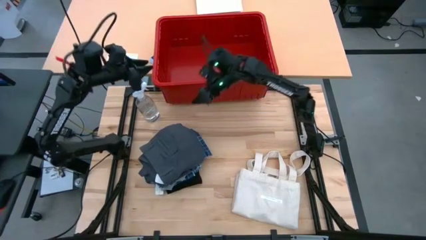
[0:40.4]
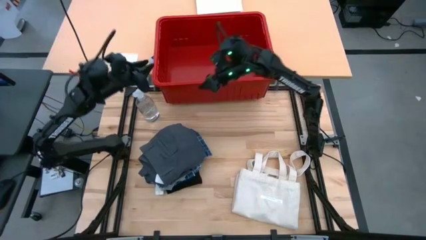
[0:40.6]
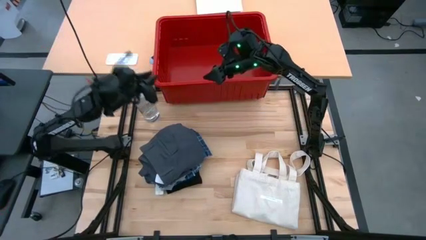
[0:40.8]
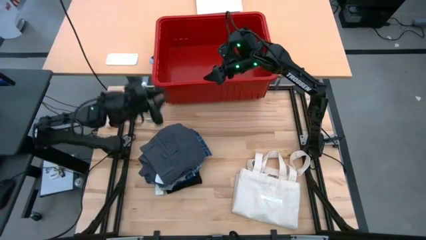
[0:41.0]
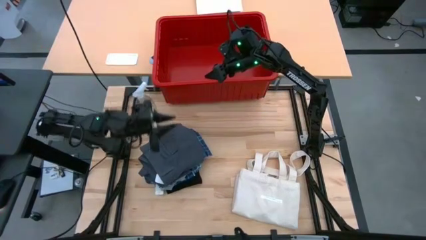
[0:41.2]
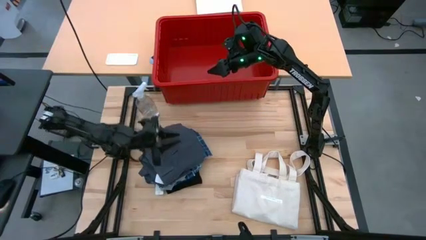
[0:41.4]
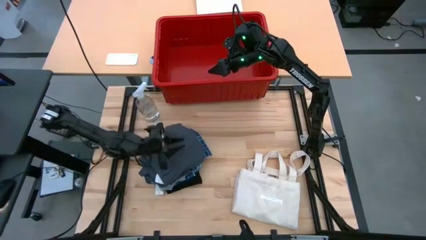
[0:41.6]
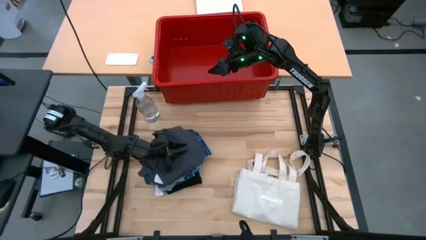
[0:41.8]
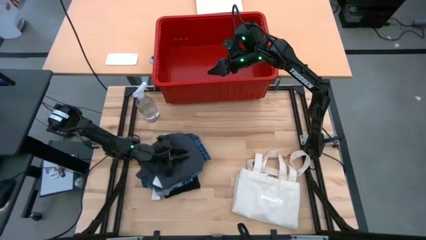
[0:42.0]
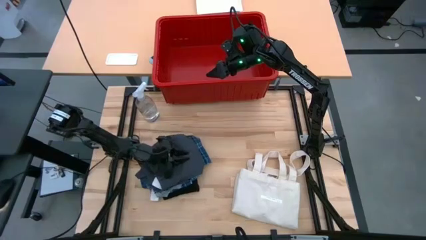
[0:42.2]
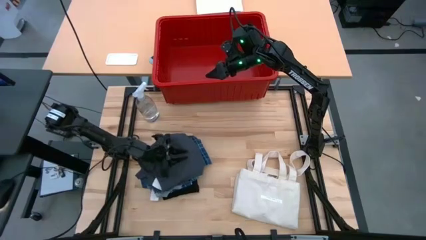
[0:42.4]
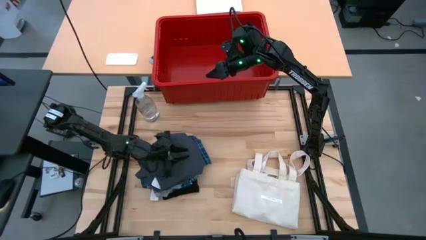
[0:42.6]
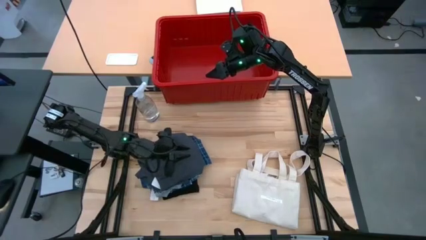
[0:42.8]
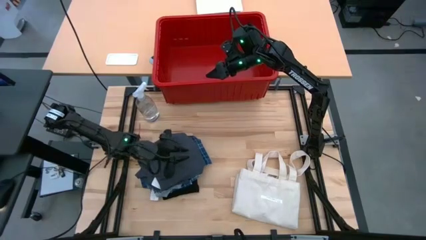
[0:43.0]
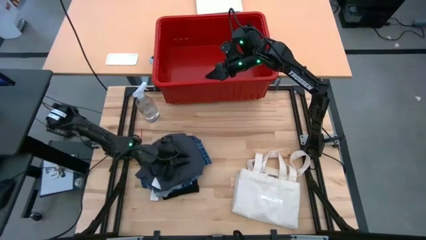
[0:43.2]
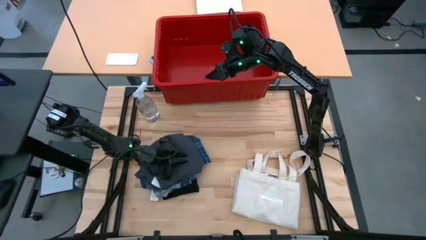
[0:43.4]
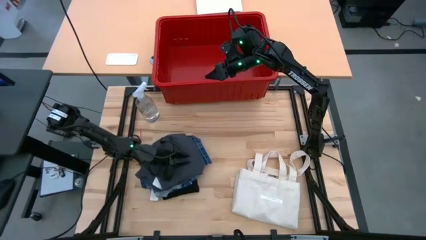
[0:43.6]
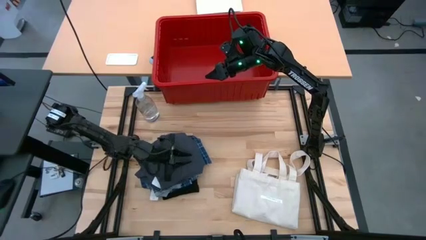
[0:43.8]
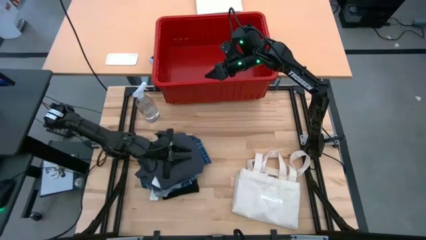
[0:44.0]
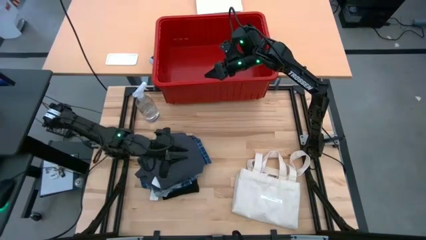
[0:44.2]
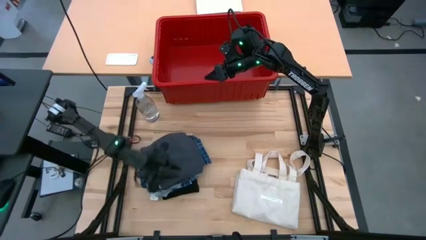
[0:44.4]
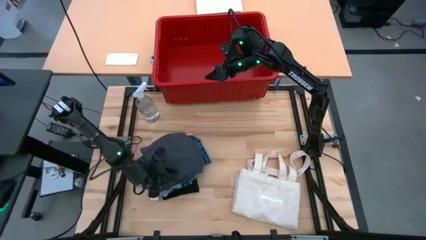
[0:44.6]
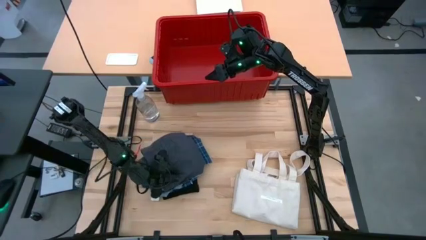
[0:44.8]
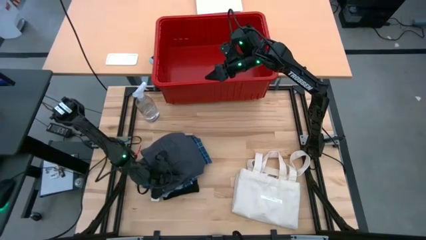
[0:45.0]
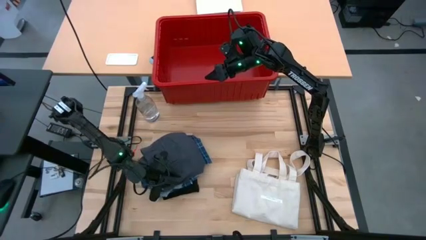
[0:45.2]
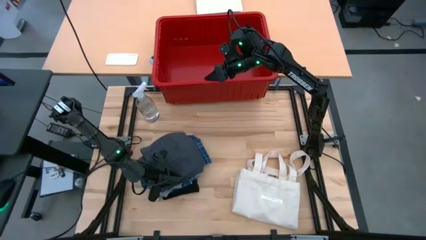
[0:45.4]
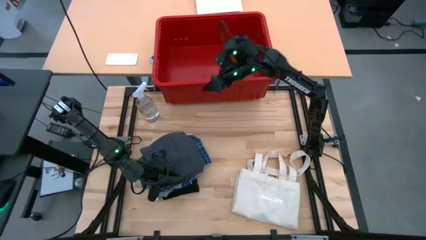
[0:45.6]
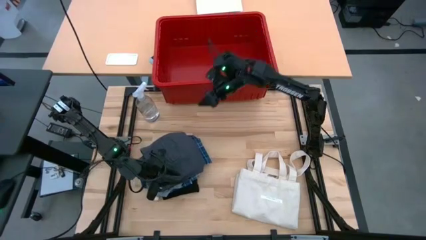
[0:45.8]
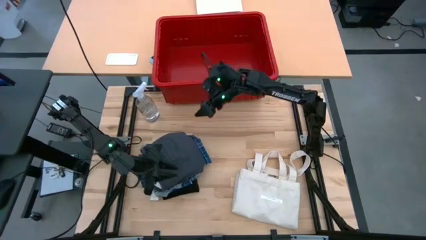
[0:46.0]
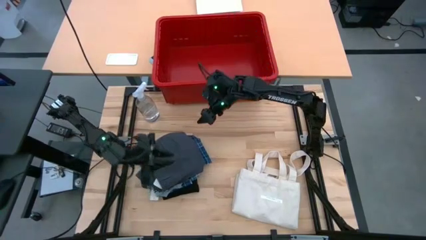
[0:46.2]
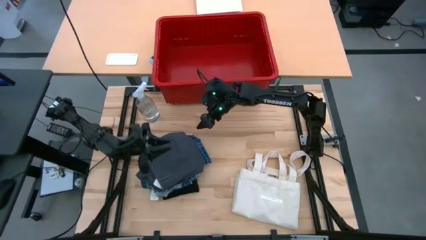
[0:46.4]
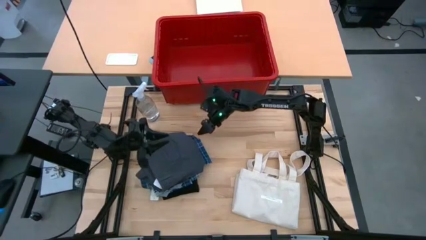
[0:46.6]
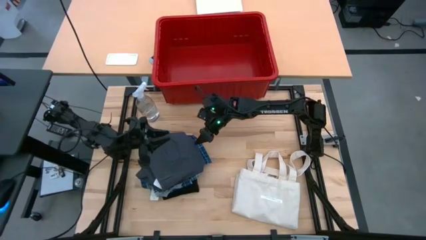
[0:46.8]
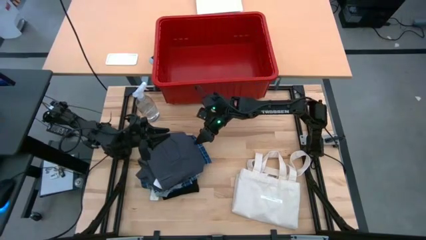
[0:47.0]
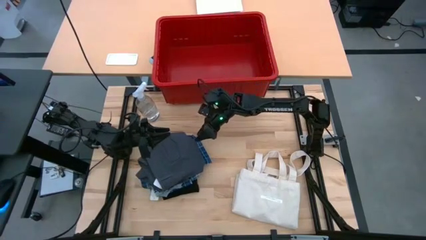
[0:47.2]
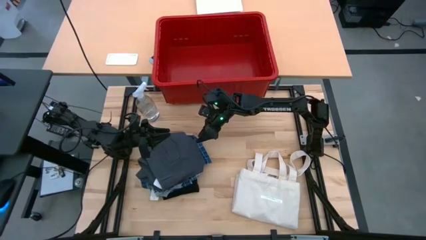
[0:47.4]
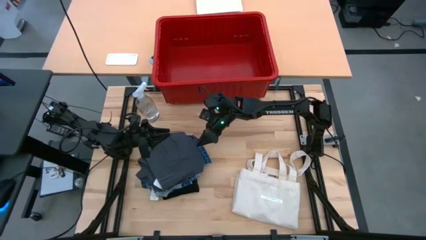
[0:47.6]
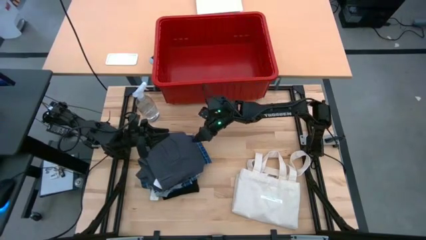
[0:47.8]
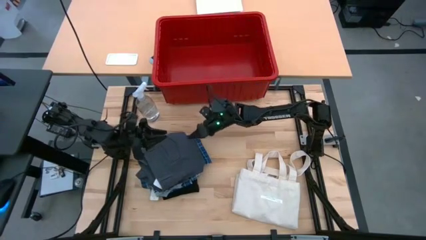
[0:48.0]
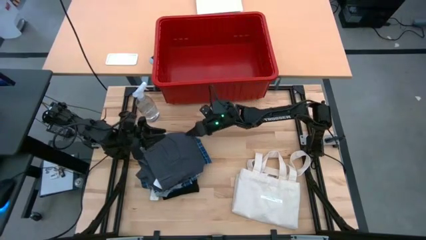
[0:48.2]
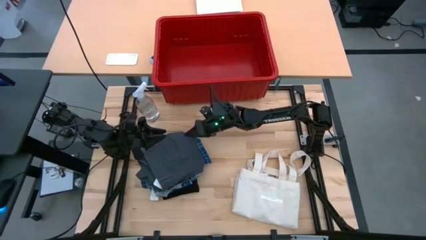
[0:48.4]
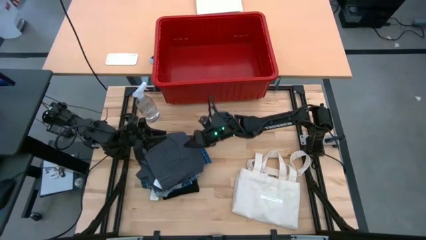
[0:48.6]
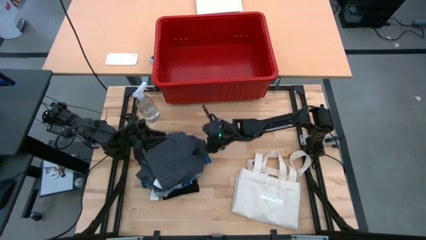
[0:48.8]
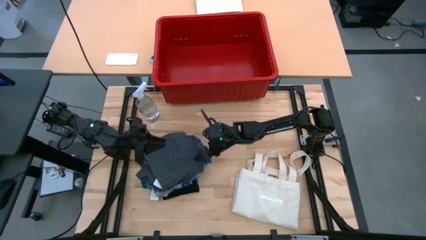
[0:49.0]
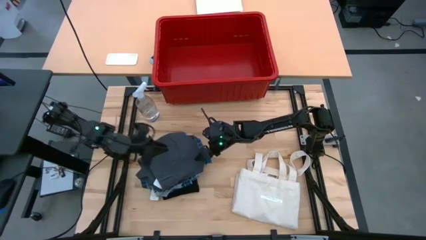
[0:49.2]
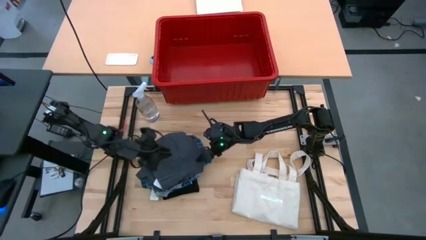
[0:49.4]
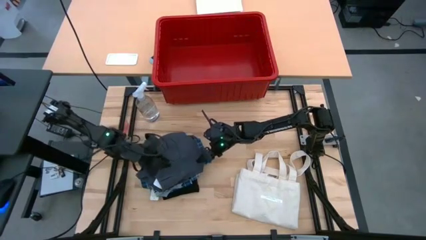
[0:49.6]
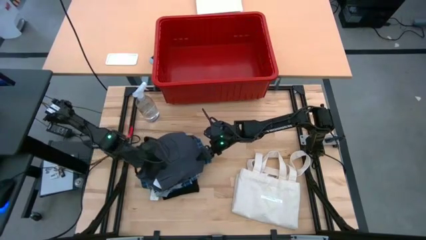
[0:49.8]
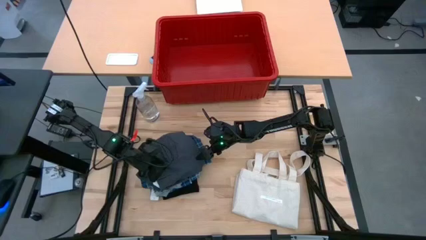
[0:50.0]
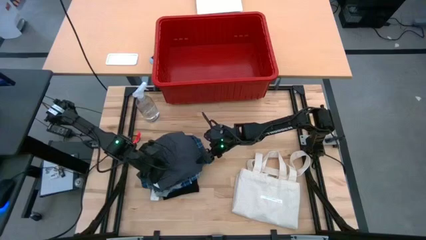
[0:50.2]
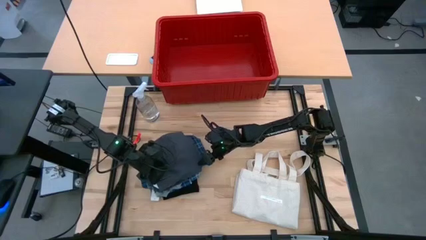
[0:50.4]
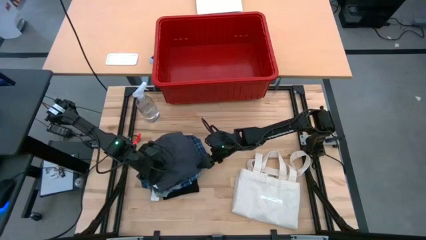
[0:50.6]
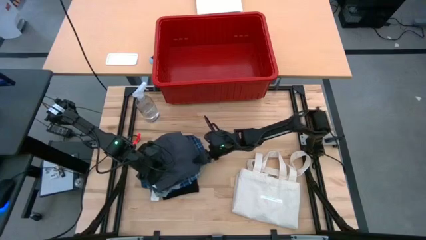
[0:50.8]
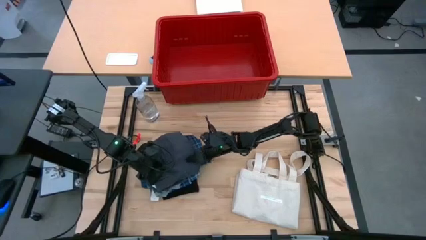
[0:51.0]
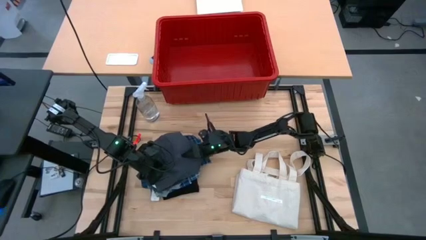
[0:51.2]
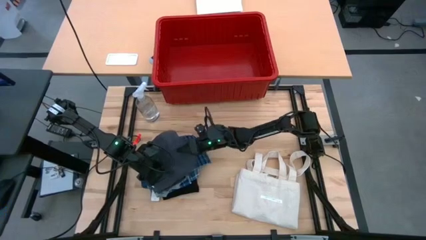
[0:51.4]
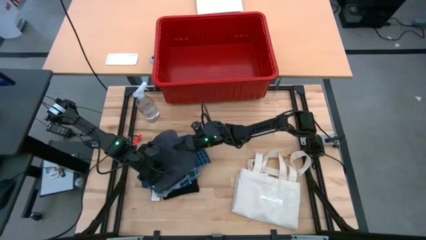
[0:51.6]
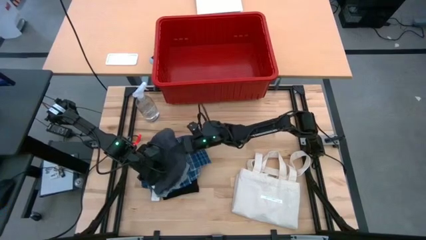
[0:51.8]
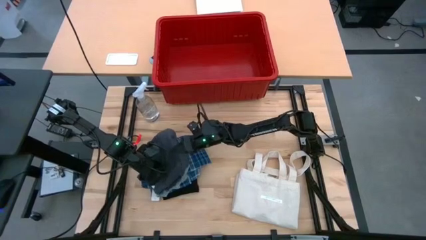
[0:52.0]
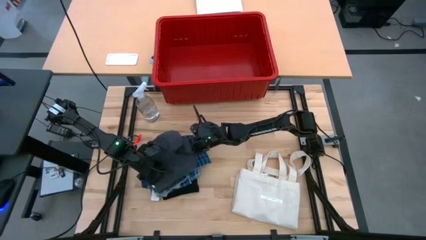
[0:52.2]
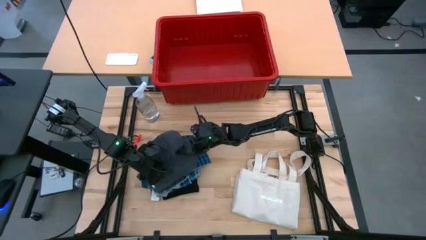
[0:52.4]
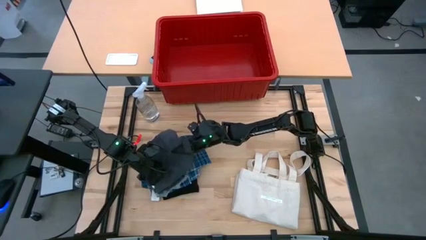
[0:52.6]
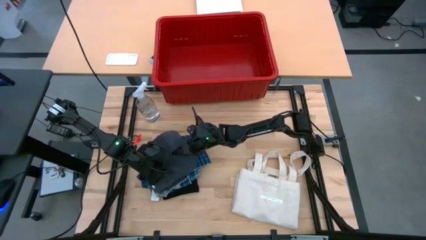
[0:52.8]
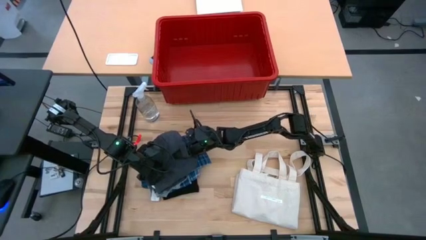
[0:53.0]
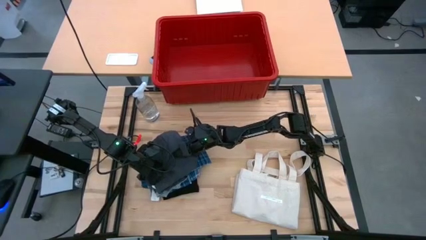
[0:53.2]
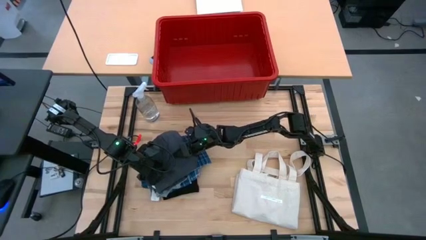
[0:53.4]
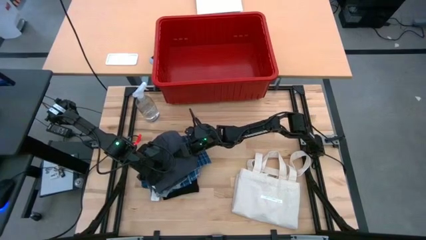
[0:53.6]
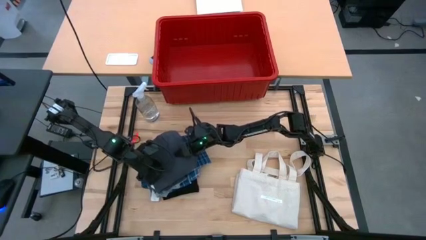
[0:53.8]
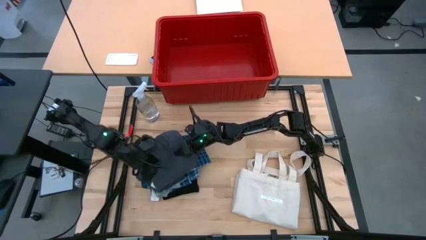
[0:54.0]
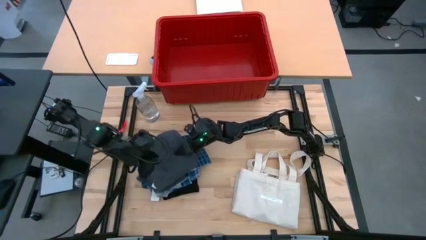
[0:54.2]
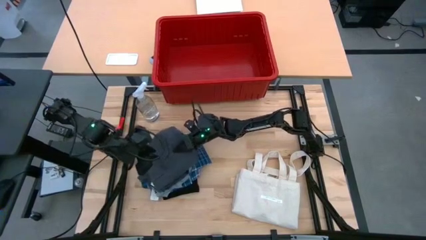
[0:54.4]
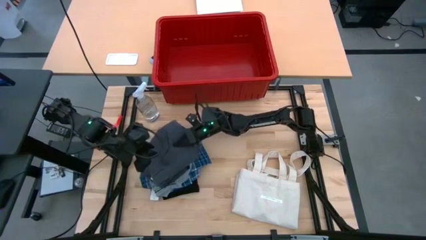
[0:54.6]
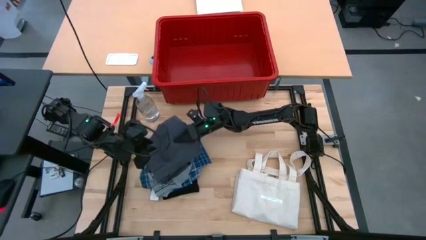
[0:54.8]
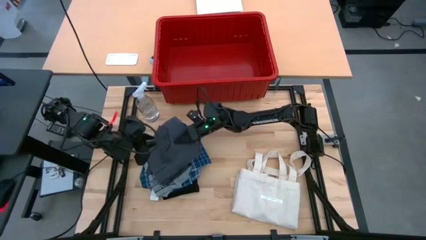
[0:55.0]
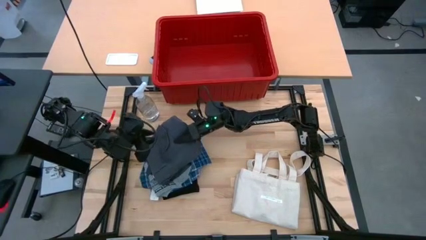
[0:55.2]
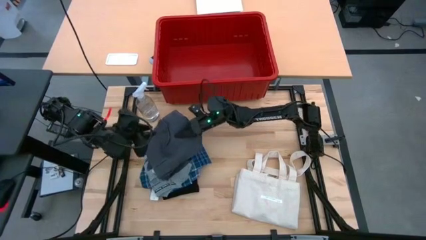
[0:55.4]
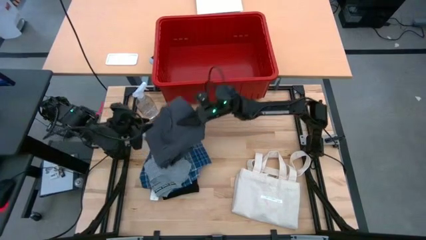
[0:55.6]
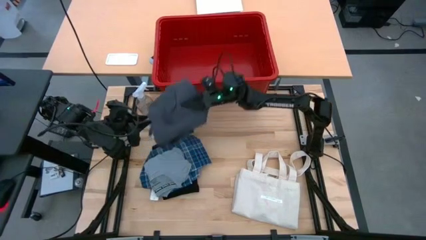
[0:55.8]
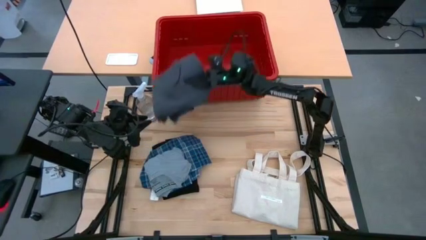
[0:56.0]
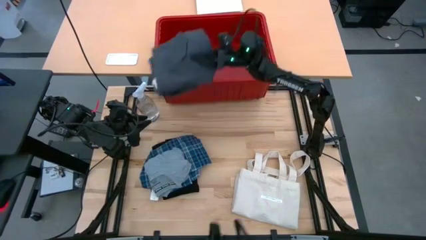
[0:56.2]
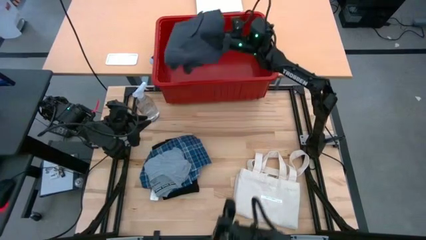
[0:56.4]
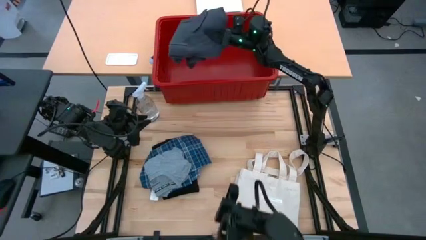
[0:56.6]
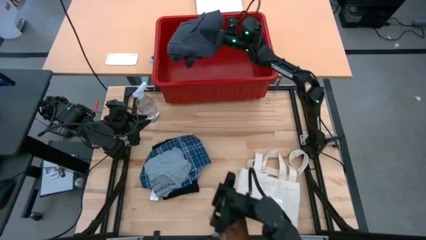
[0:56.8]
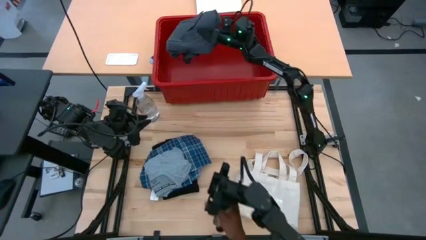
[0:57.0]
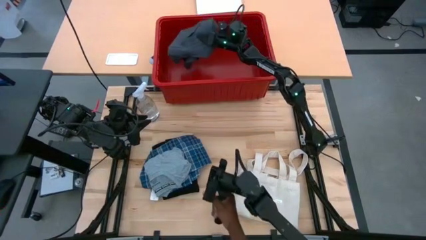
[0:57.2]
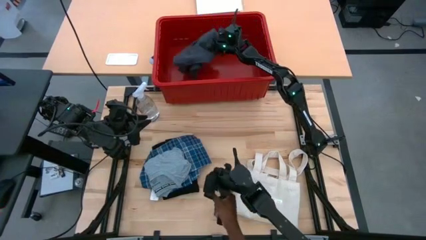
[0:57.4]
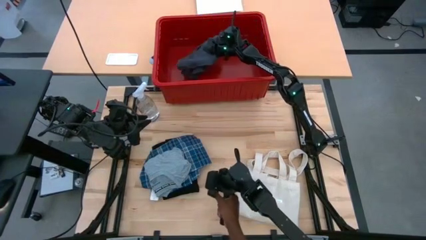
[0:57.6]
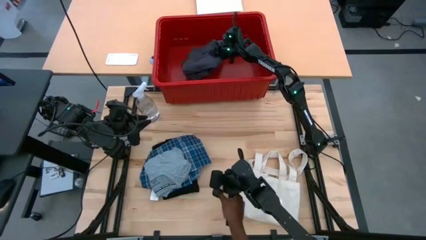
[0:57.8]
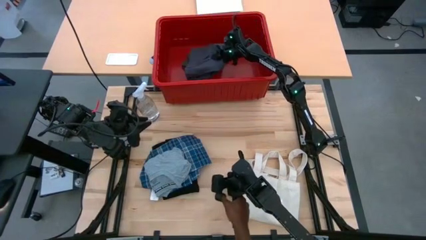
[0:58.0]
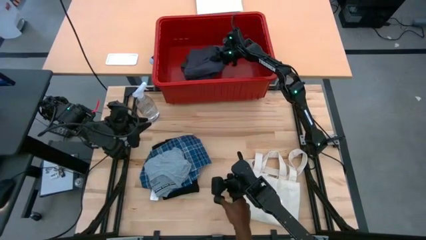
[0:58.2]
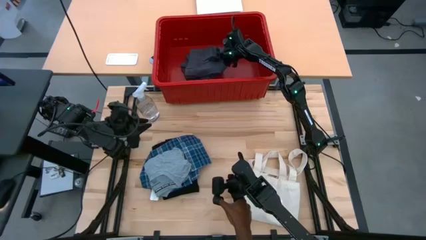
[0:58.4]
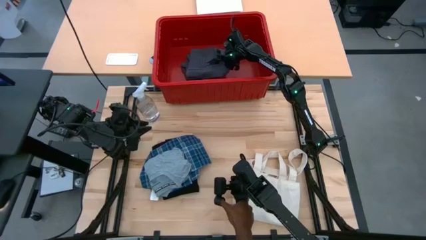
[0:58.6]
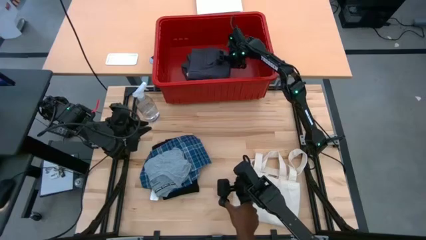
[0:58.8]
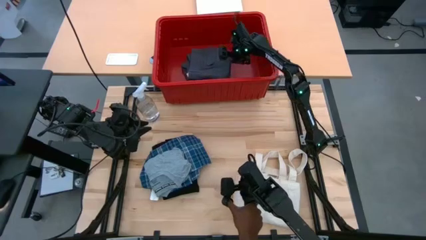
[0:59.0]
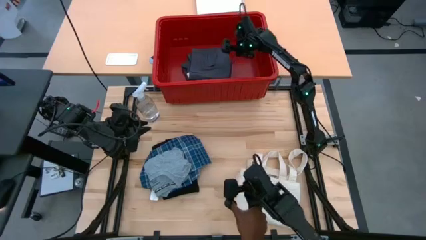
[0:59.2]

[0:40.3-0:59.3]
Task: Fold laundry
Put the gray pants into the red bin
